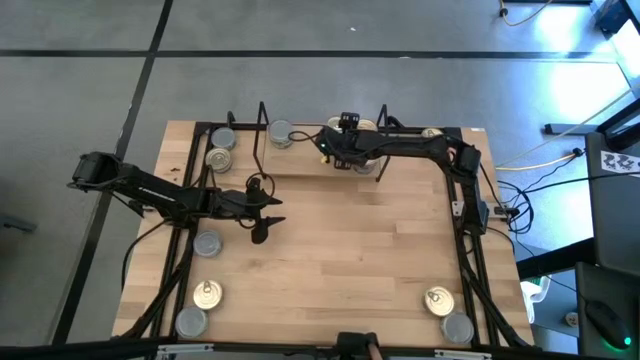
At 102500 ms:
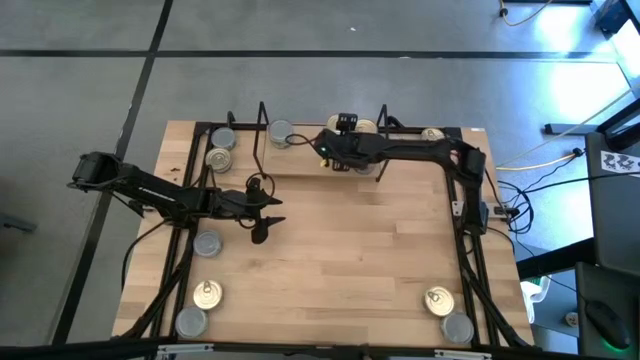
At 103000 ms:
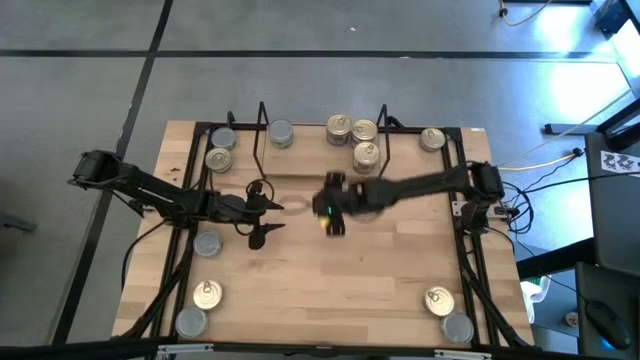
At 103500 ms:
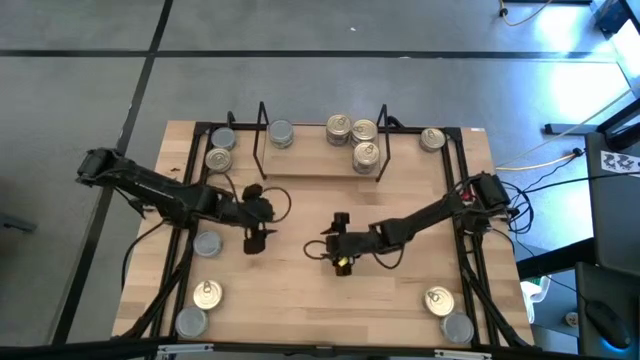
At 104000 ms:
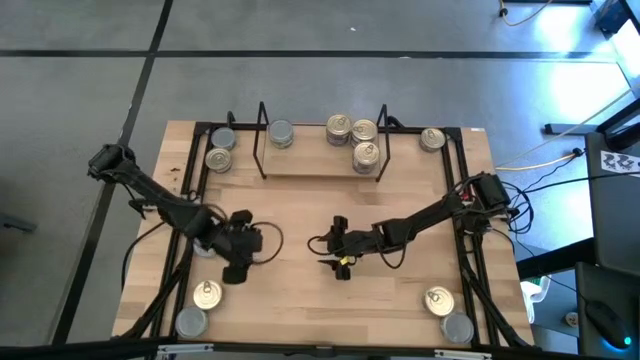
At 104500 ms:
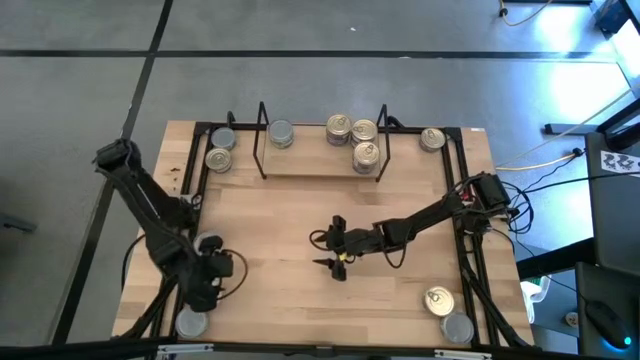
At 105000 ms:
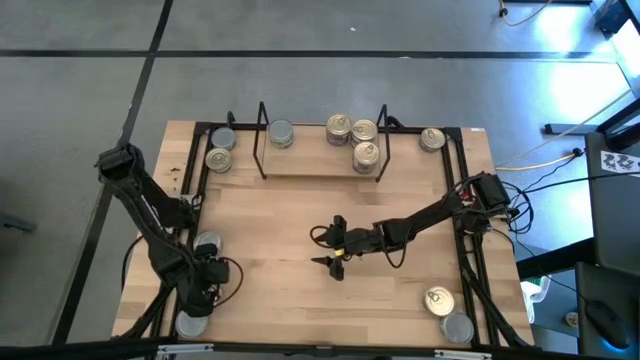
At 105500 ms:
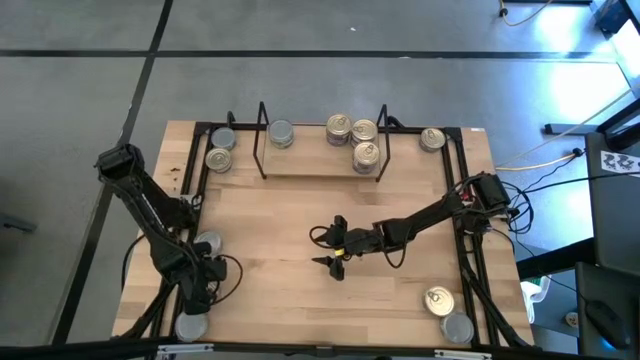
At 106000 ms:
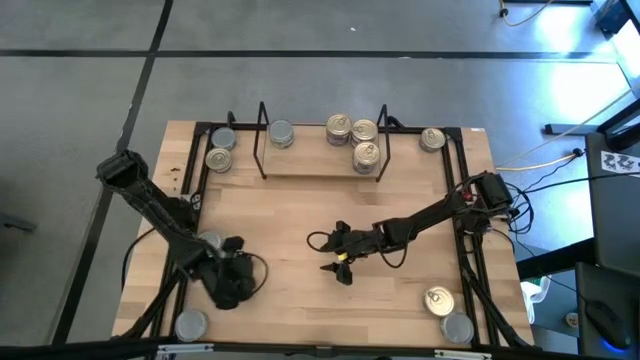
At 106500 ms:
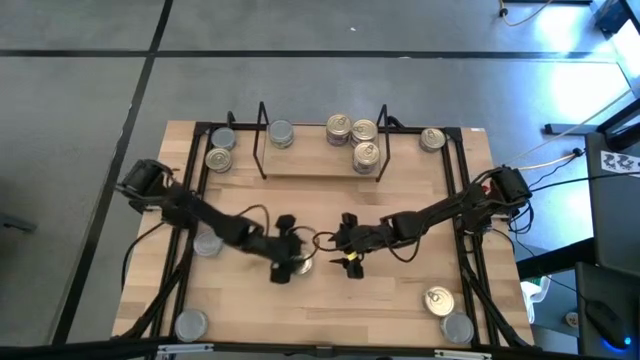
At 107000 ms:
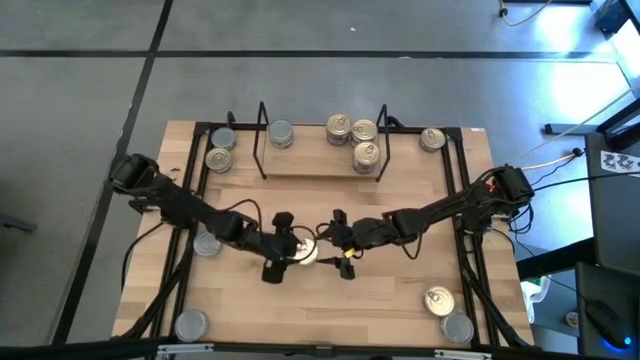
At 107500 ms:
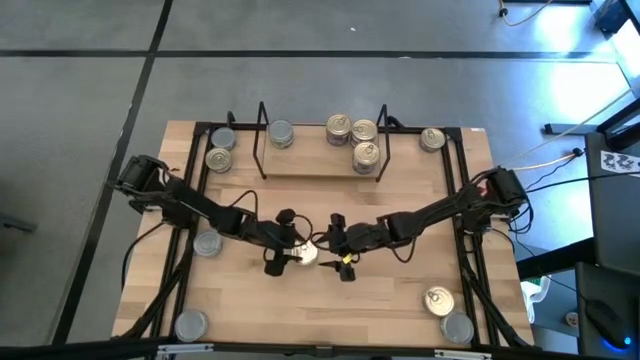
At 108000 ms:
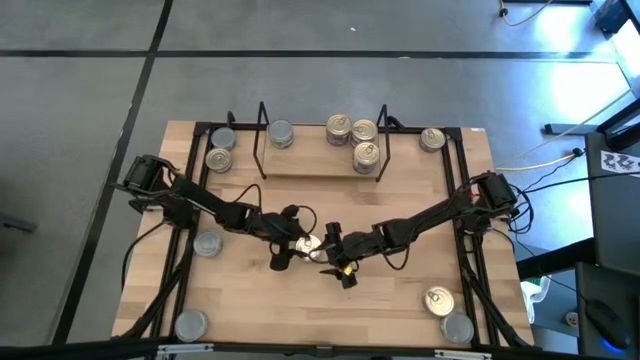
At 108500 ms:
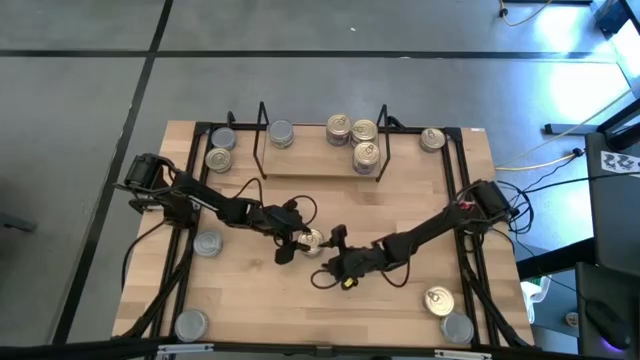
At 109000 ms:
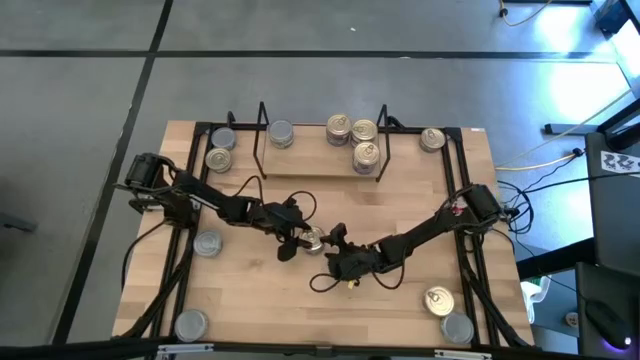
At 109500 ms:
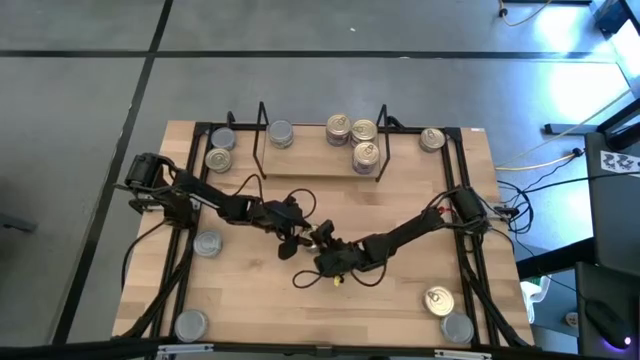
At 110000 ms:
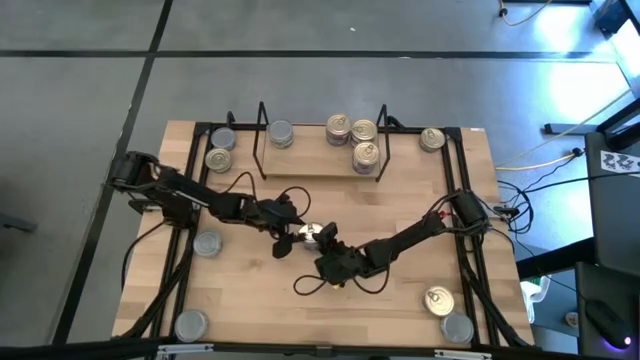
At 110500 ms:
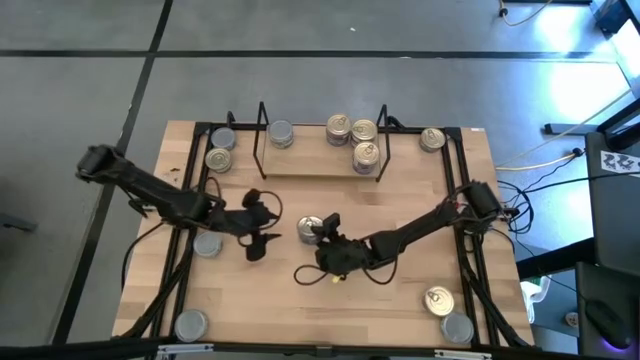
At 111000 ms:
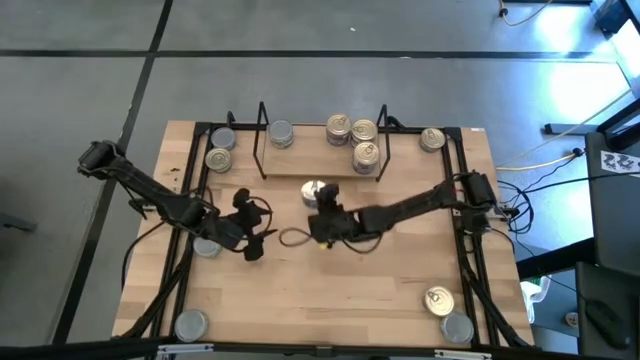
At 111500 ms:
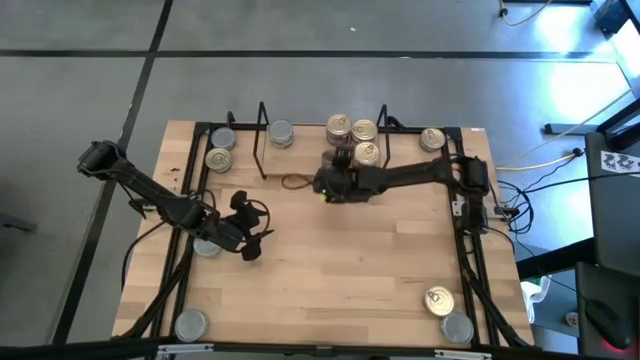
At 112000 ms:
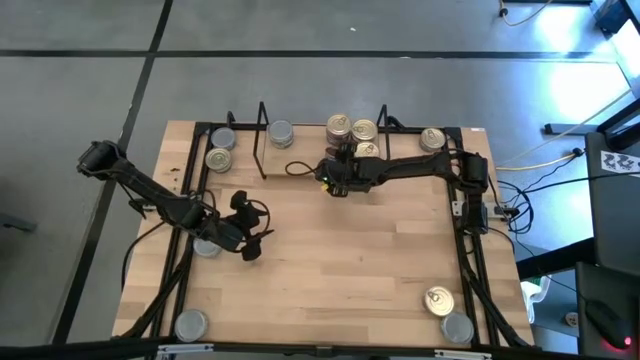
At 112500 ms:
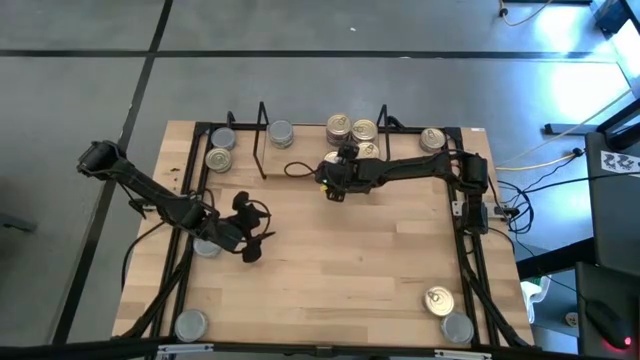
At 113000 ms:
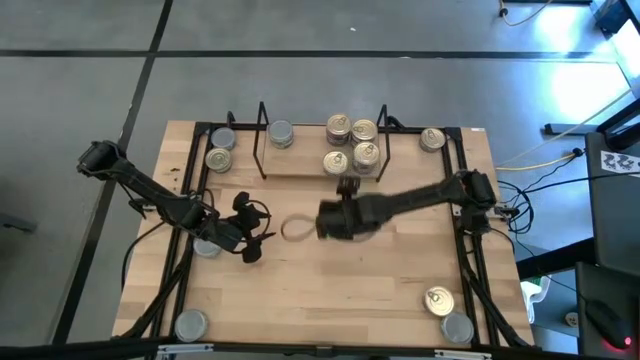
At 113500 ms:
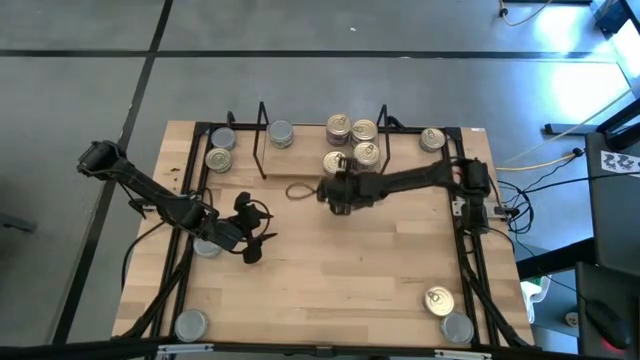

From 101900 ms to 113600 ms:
Task: Stack canned seafood by type on shelf
Put the blue-pink tuna can on the shelf

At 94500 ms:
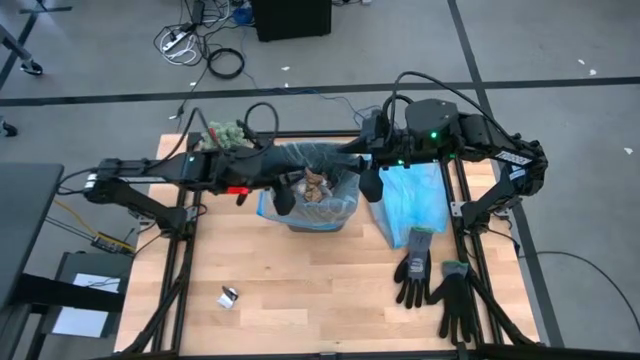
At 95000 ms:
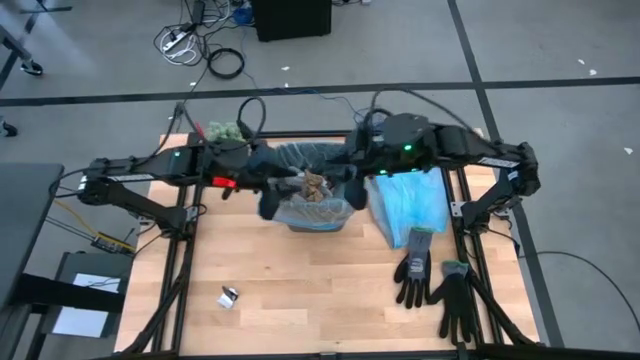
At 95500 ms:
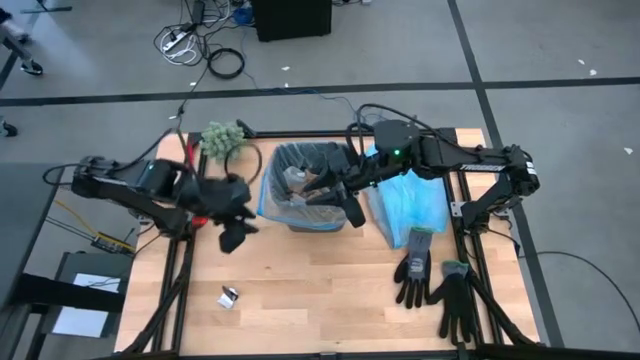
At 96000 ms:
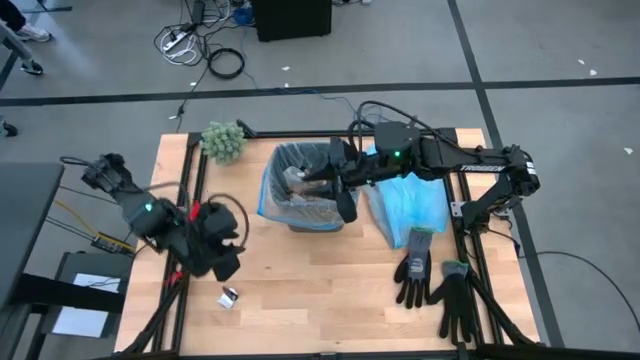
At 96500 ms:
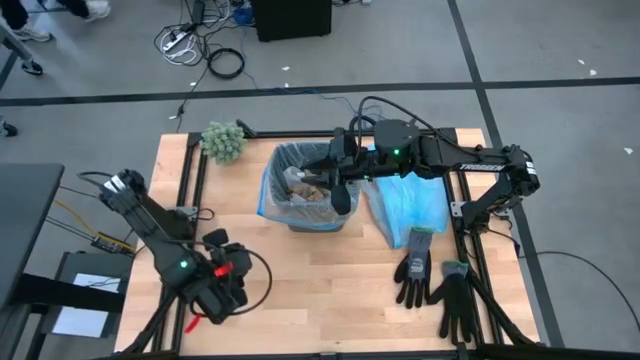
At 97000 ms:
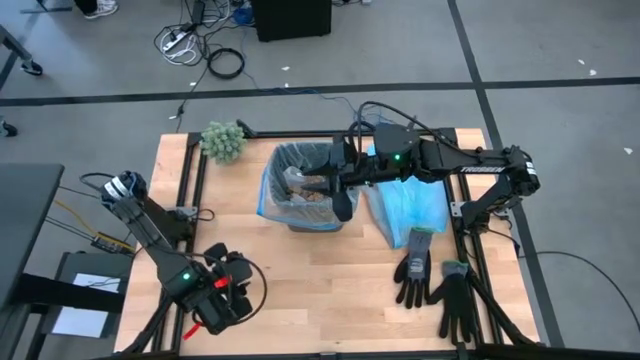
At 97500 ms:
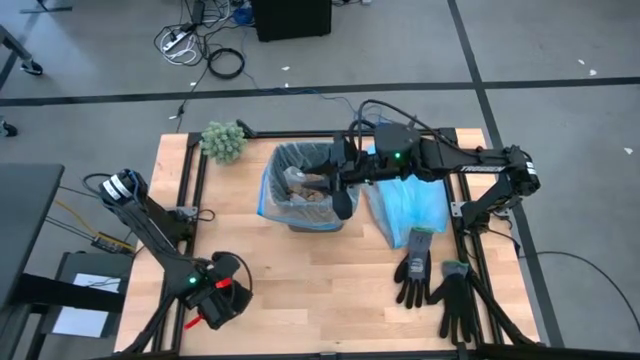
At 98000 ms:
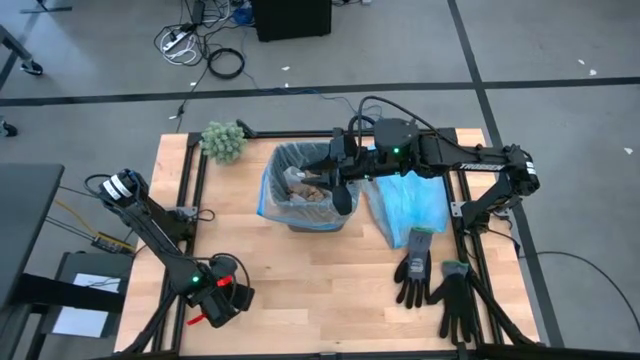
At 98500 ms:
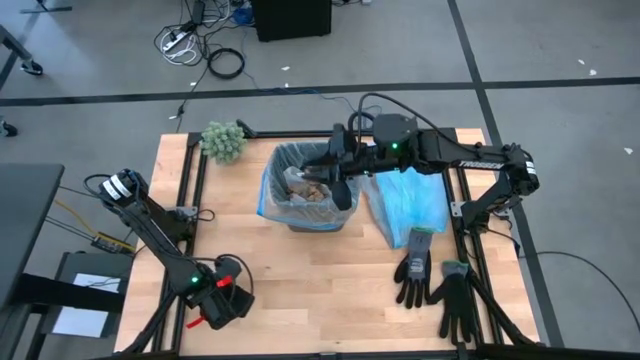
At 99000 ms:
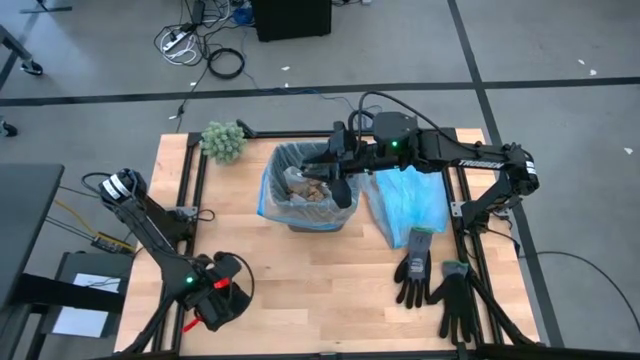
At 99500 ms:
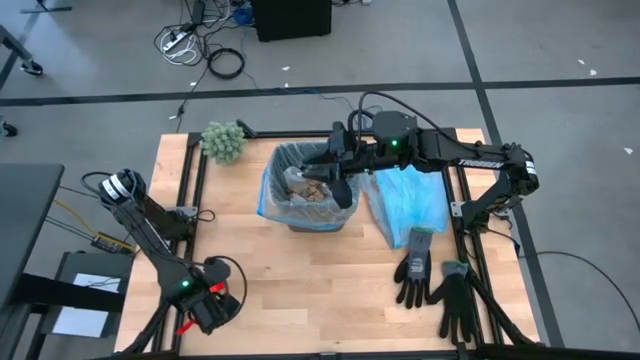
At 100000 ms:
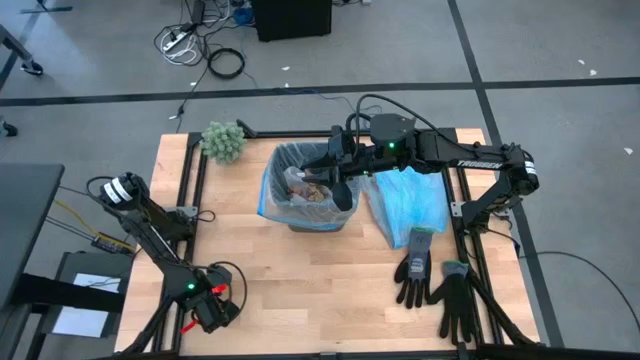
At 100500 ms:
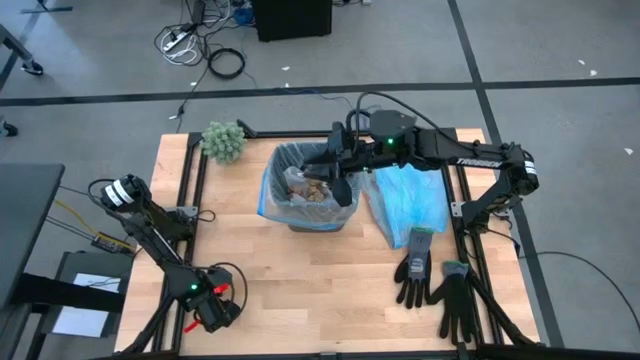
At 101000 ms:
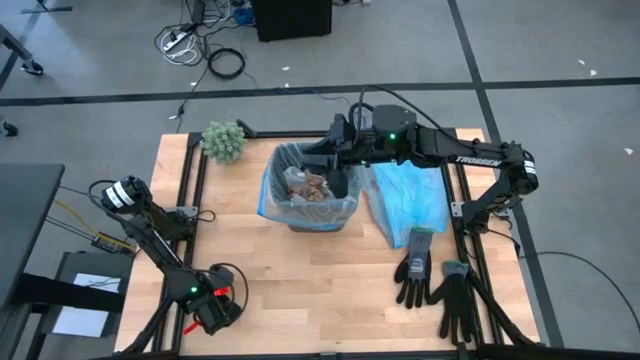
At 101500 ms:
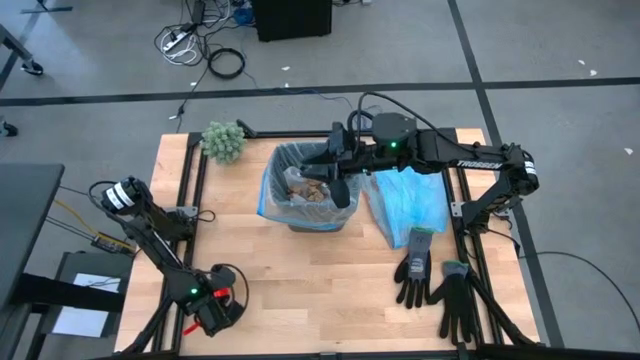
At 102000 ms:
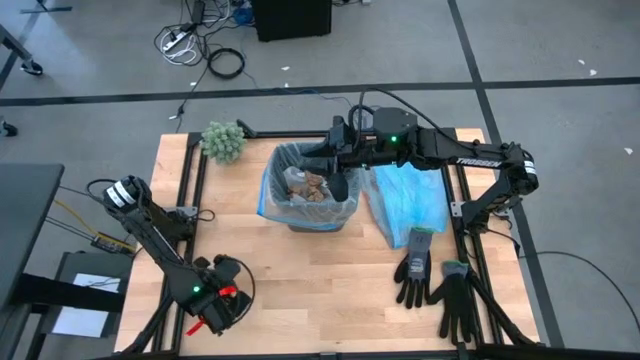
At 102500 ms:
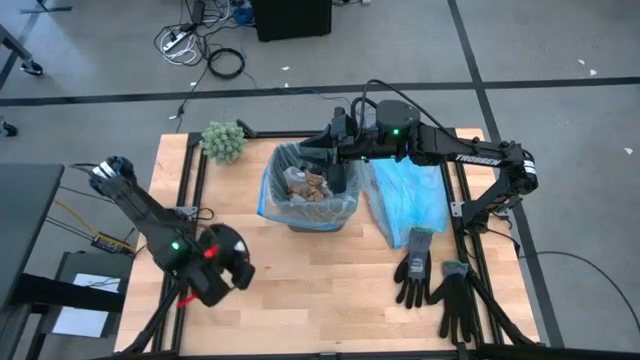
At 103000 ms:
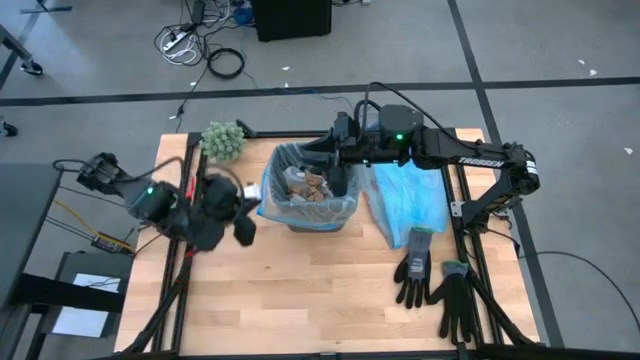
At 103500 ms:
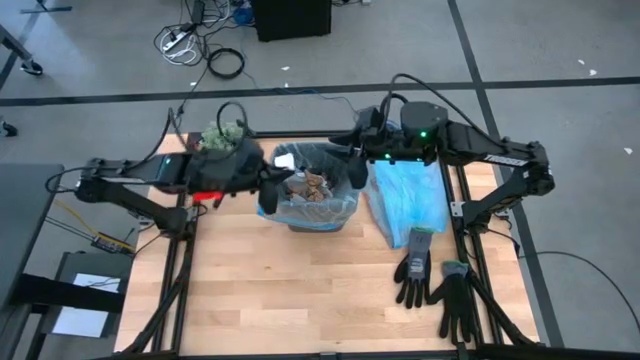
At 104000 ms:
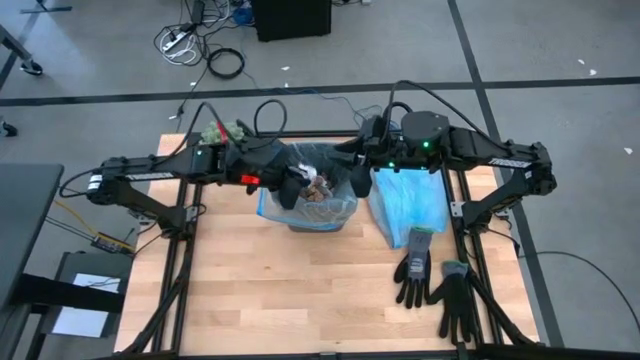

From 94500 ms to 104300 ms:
Task: place trash/remove bag and relplace
Put the white paper into the trash bin
